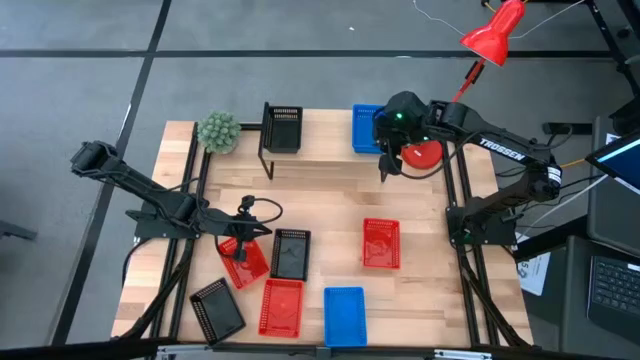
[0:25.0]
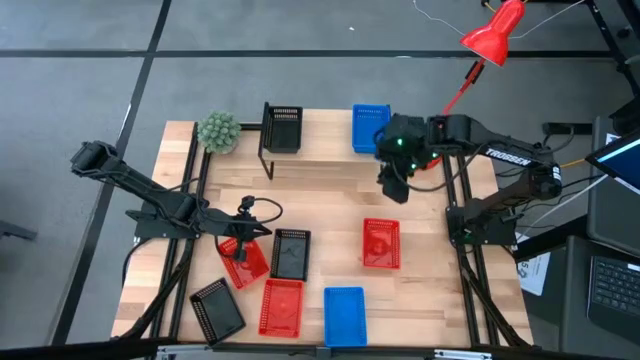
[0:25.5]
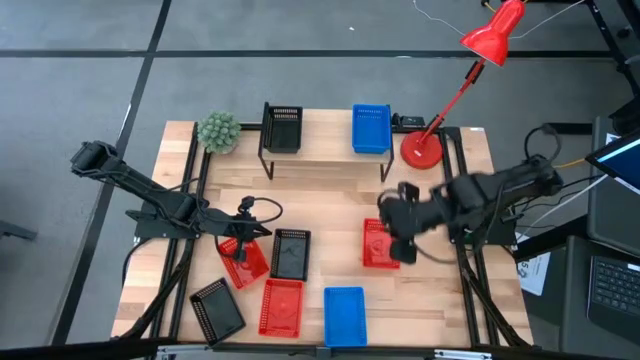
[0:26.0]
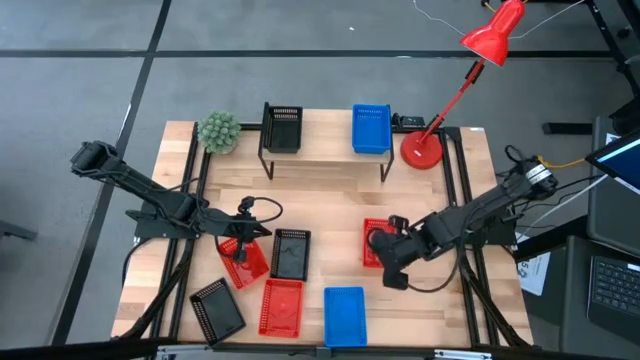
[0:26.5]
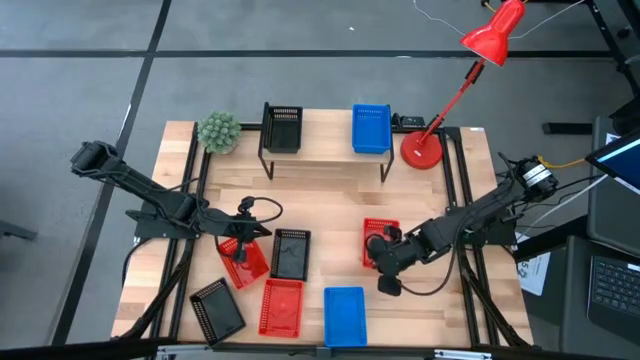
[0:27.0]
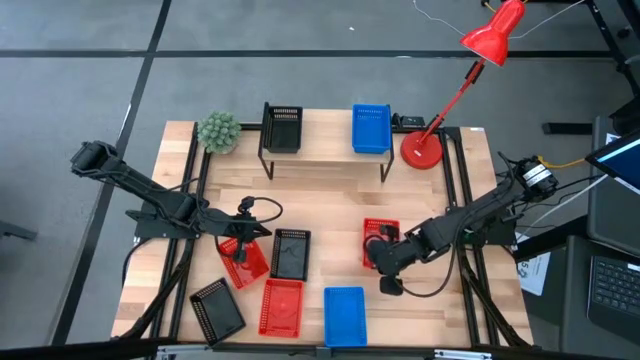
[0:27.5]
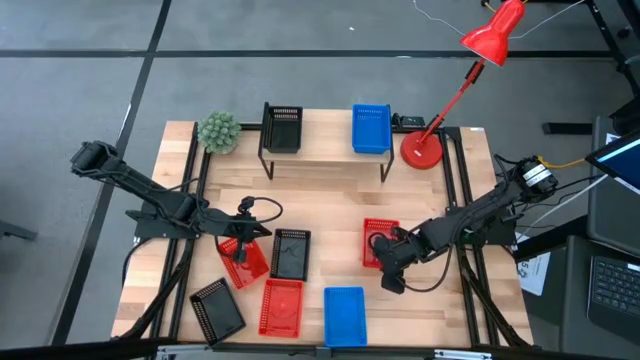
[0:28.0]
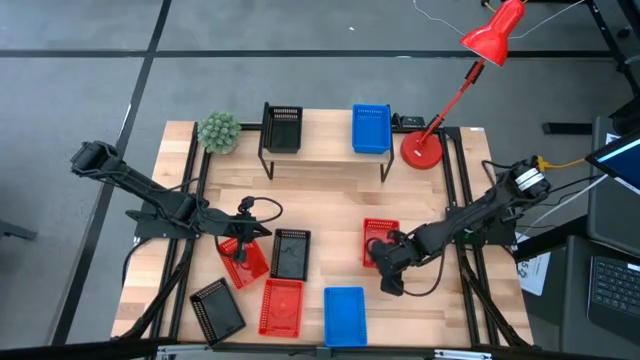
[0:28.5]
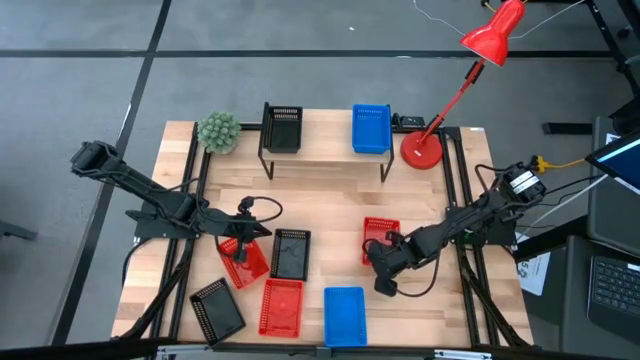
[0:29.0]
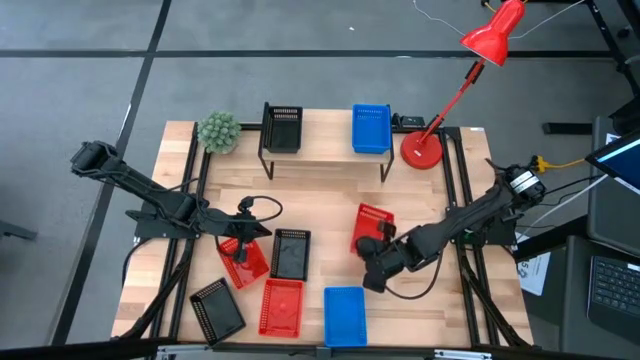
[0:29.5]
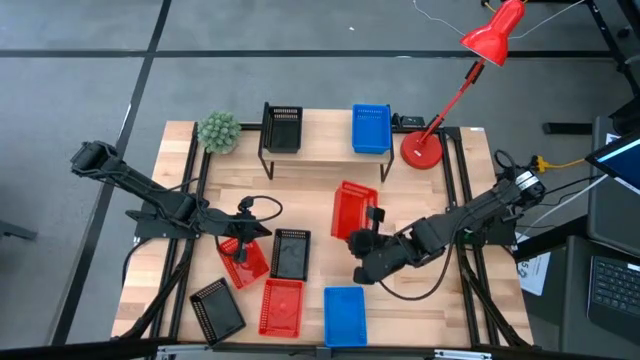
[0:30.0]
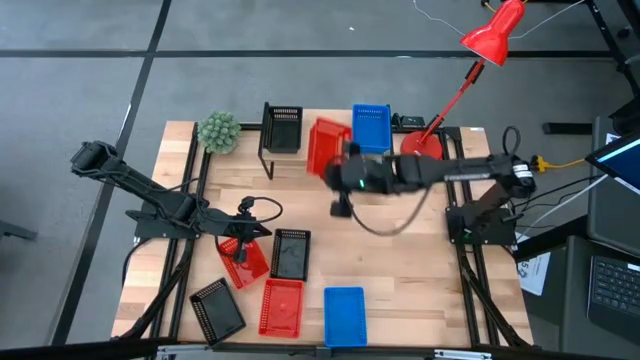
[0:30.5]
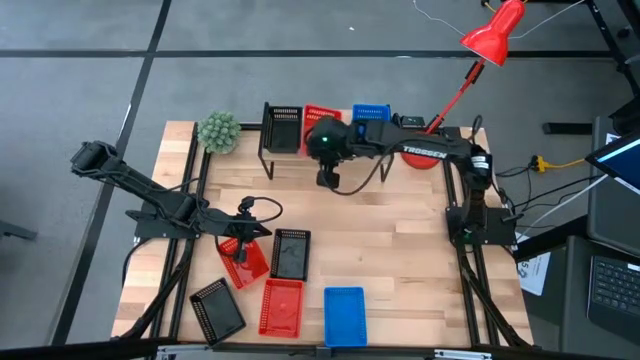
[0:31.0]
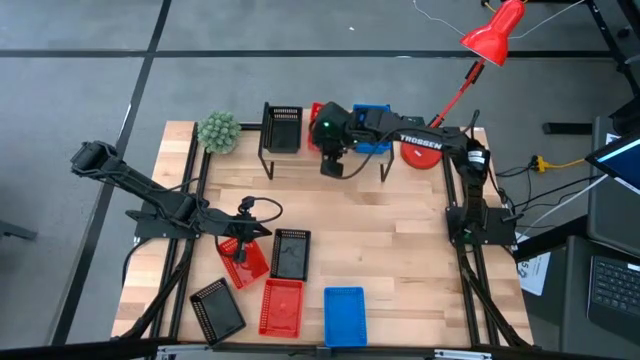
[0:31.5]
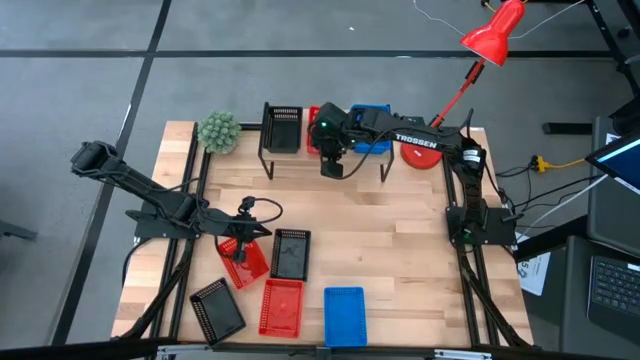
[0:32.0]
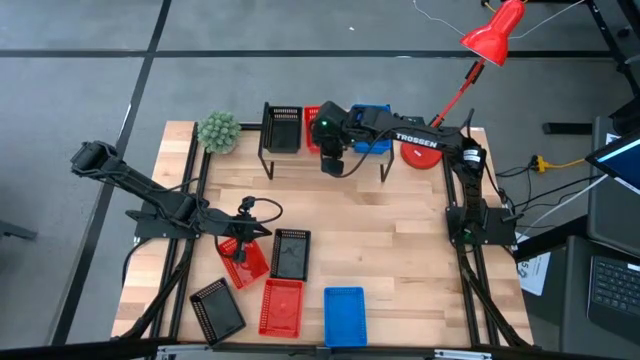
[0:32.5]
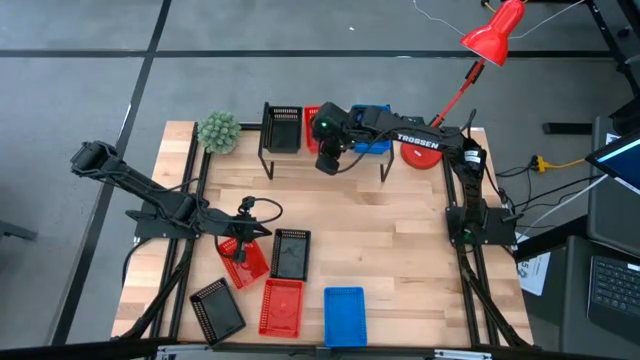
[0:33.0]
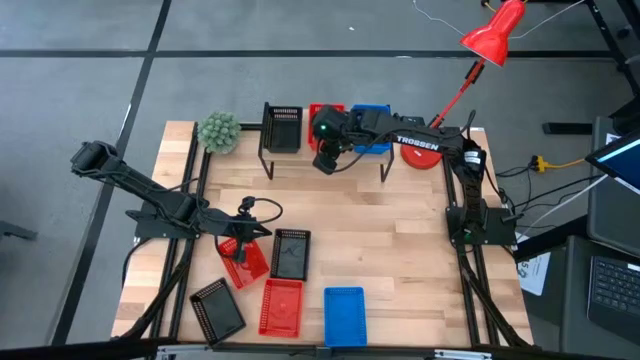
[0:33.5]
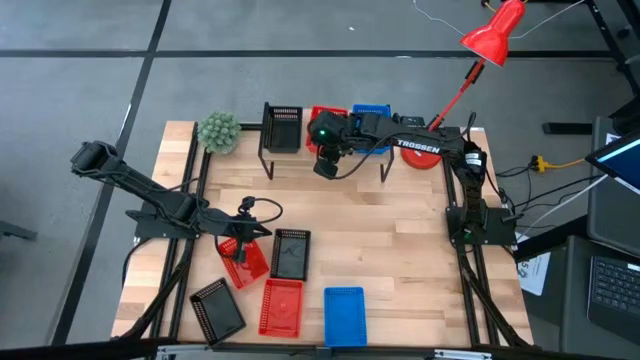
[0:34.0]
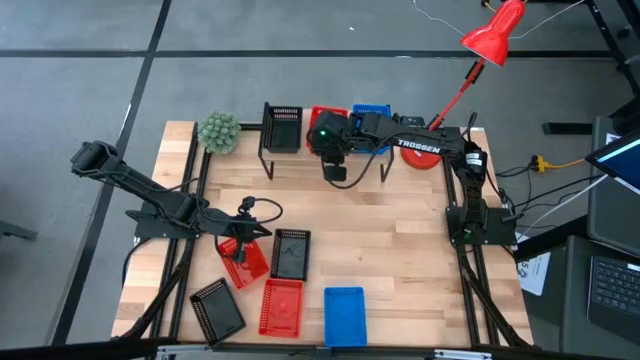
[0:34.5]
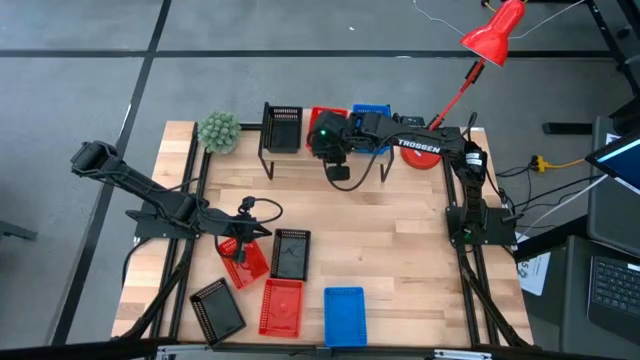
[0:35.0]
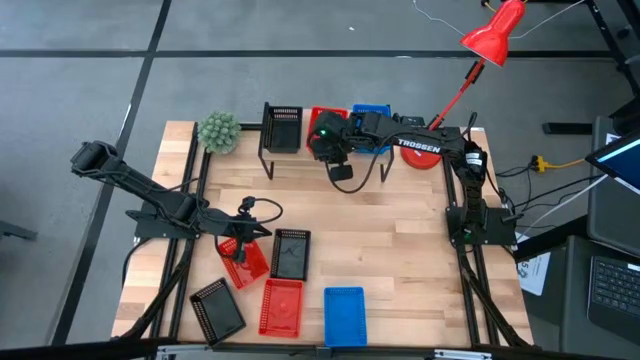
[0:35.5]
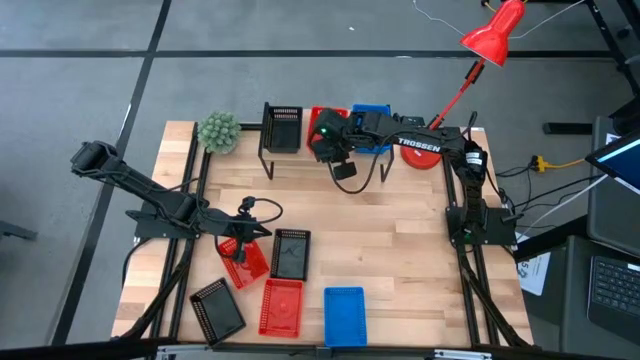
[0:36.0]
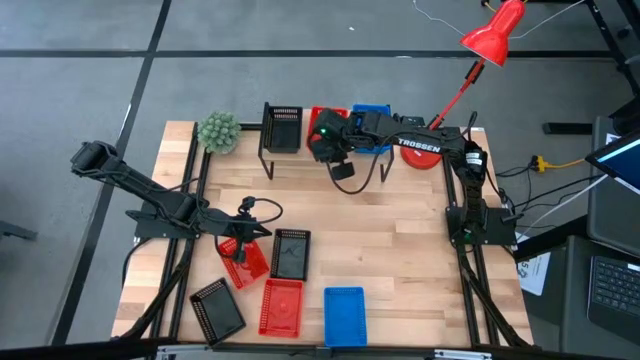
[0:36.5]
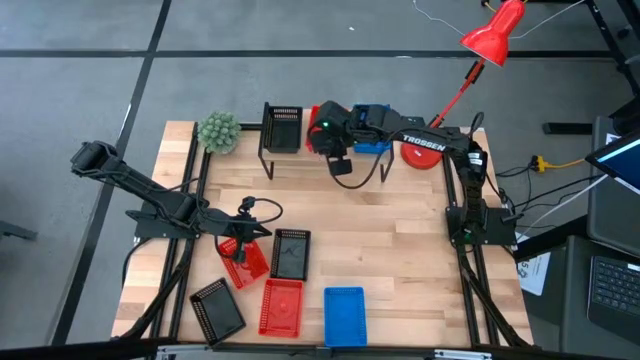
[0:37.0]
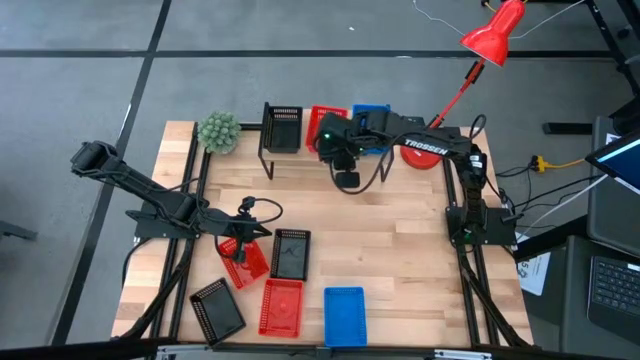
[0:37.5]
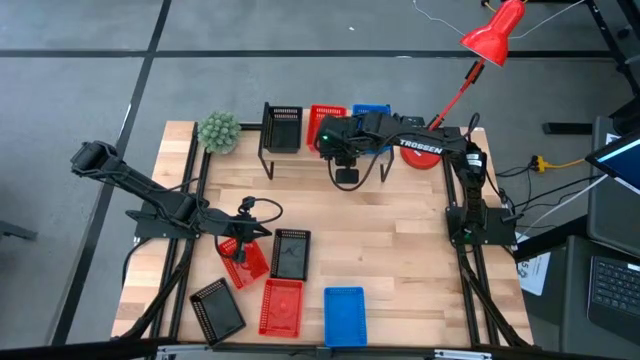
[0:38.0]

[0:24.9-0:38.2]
Task: Stack baskets on shelf by color
Put the top right red bin on the shelf

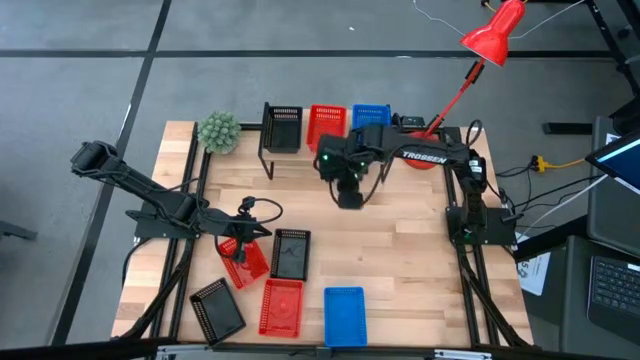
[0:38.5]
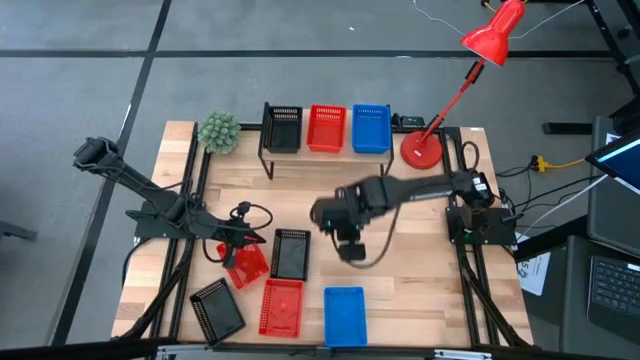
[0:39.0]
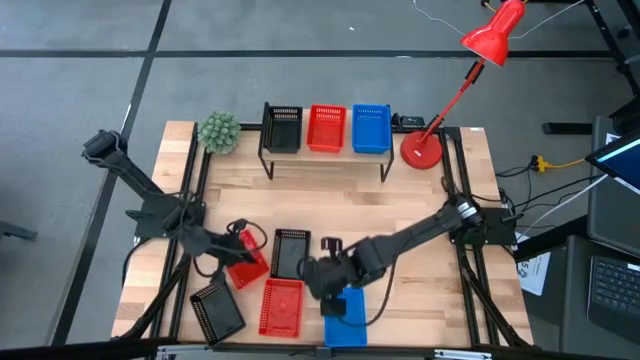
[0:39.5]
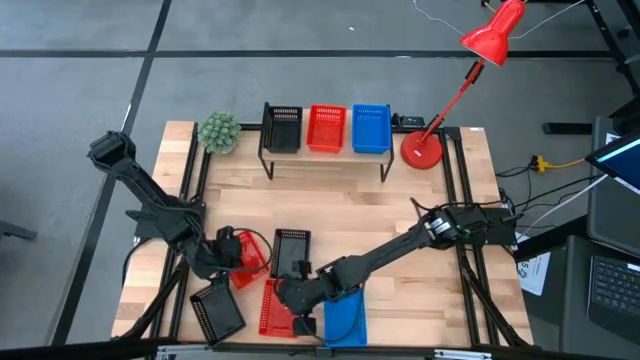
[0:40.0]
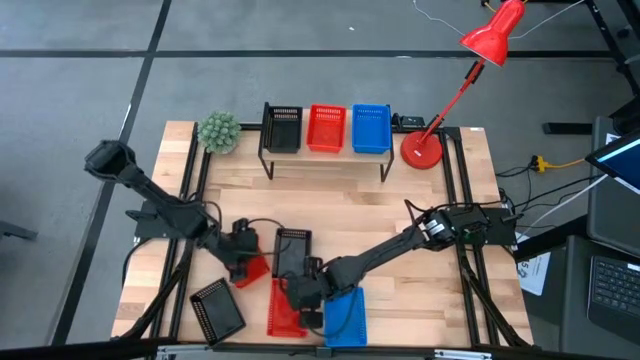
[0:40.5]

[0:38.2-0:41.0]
Adjust the bins on the table

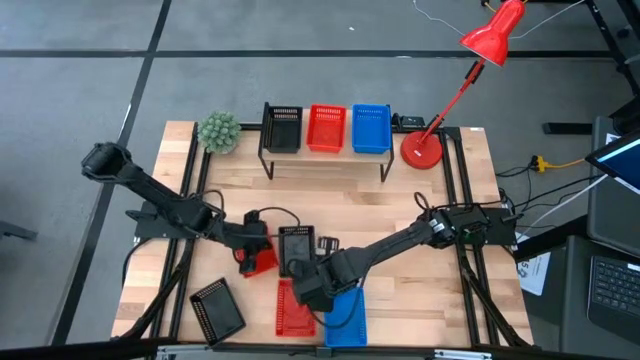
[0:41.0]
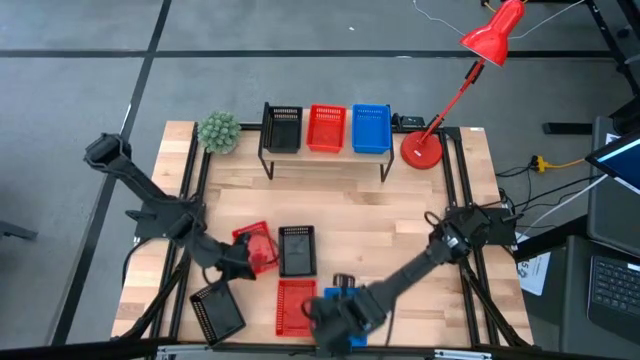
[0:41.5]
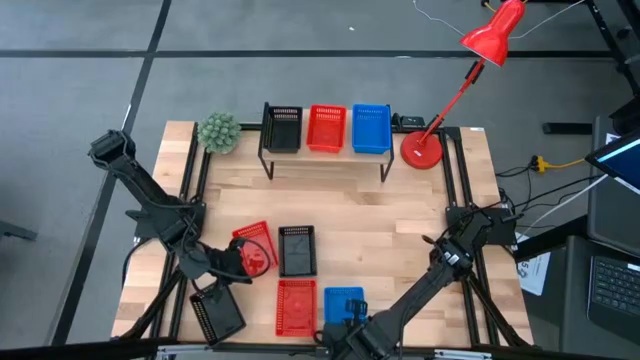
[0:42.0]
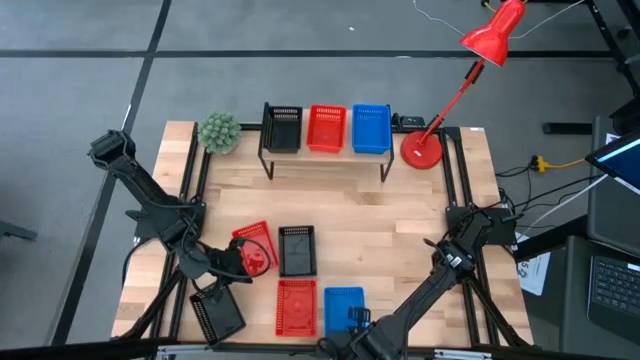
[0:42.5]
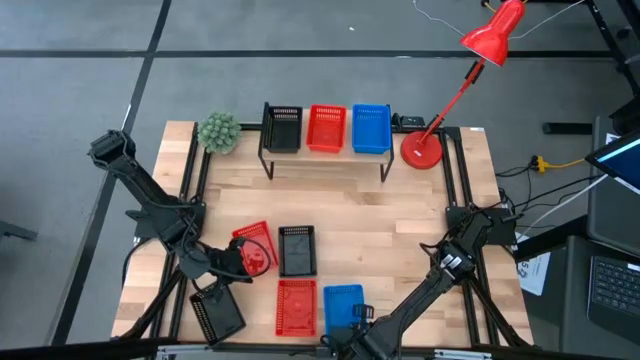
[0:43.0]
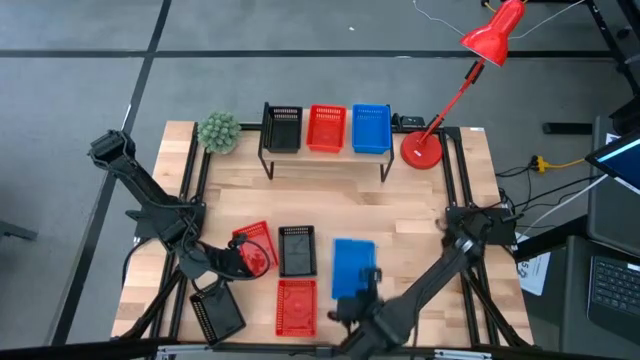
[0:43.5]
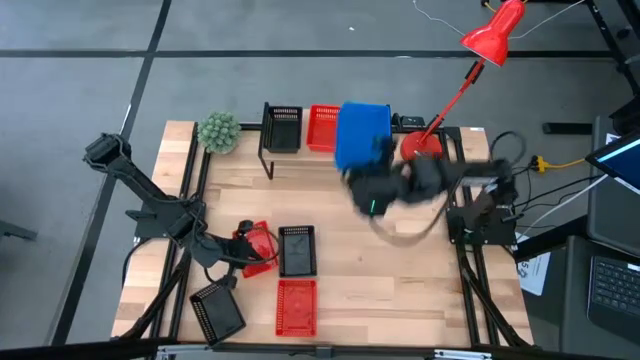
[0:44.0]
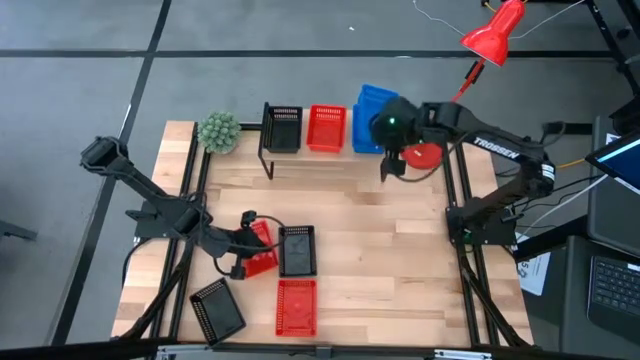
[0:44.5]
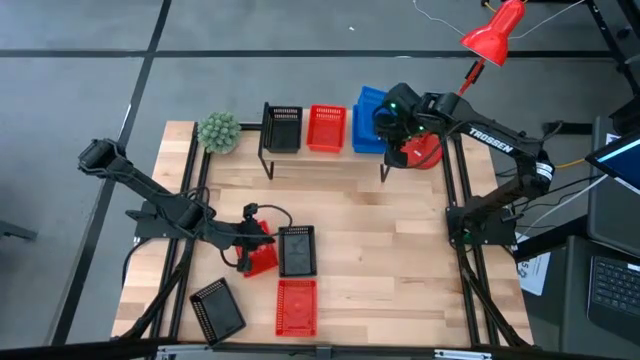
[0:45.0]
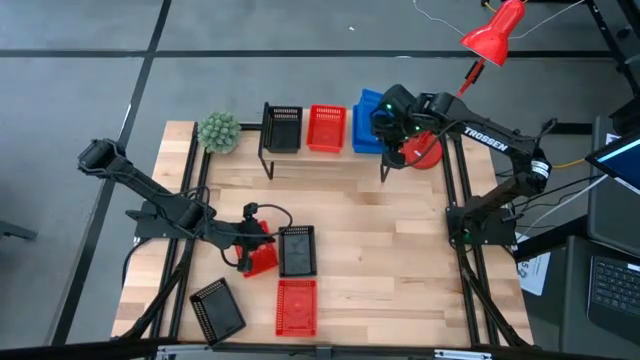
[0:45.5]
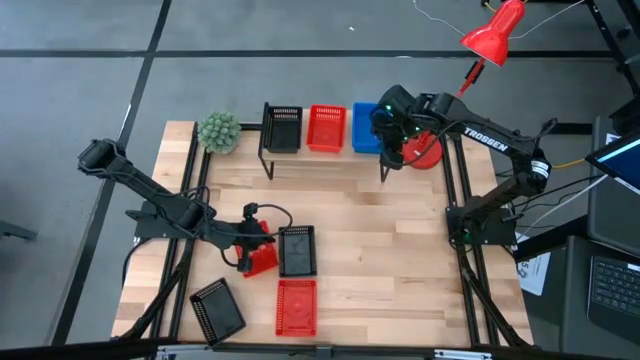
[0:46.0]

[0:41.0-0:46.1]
Stack the blue bin on the stacked blue bins on the shelf

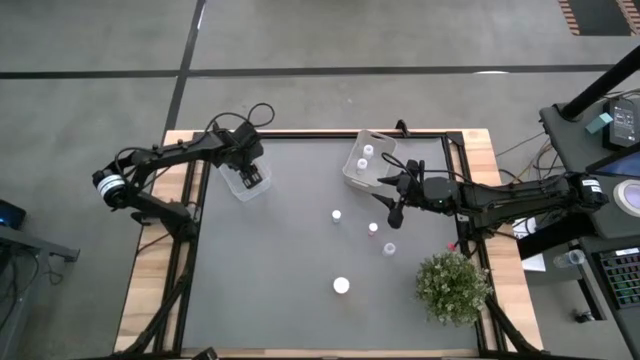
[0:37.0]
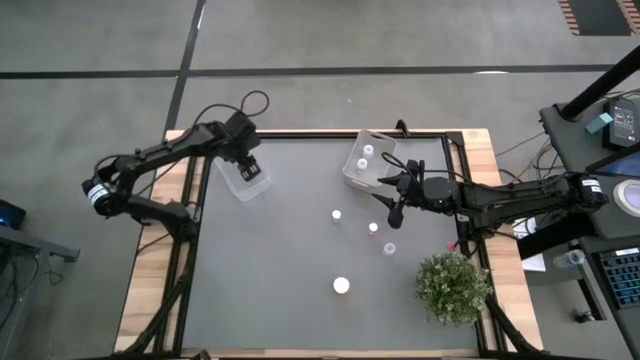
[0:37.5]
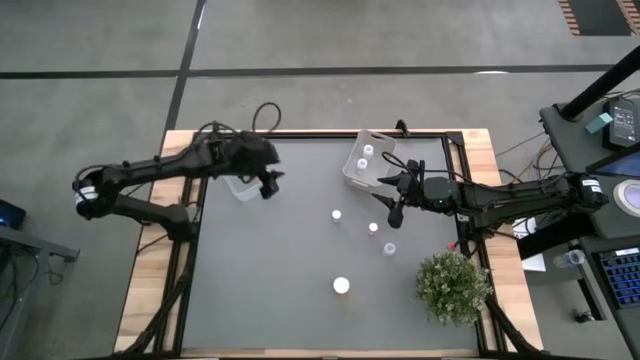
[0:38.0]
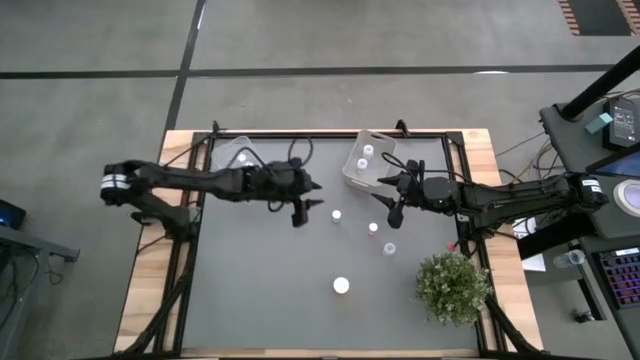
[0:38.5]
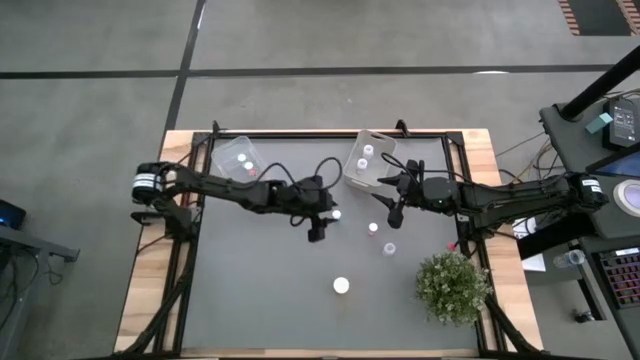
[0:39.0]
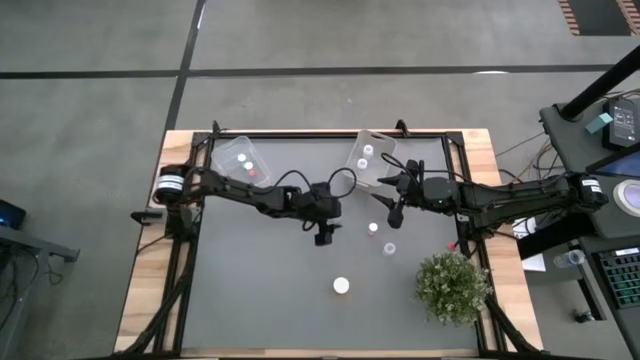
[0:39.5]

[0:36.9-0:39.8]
Task: Pick and place medicine bottles into bin by pill shape (circle, oval)
Put the blue pill bottle into the transparent bin
